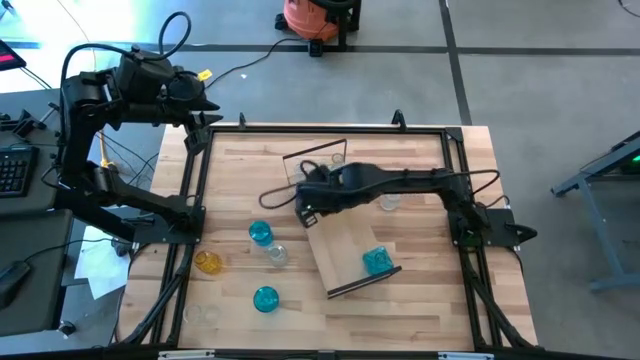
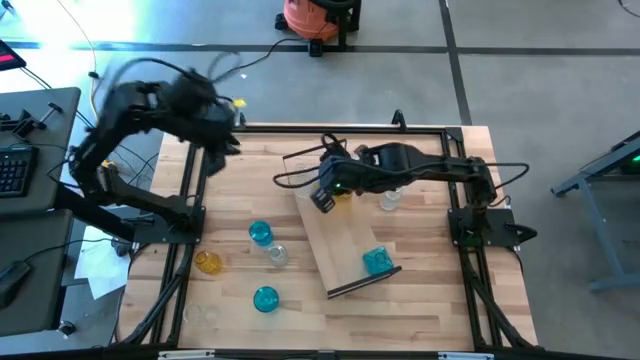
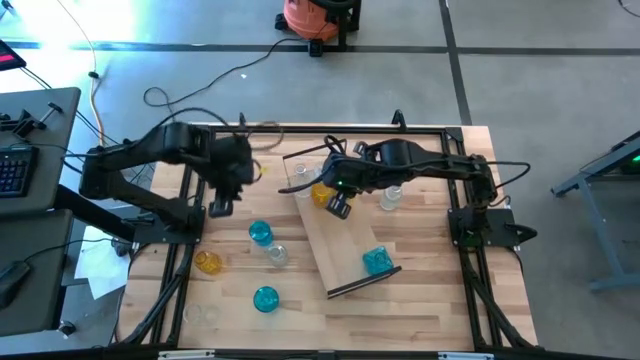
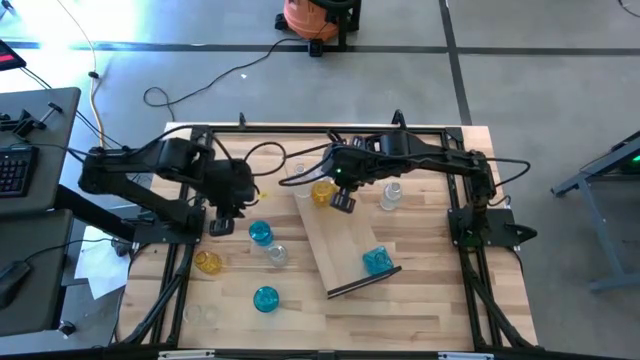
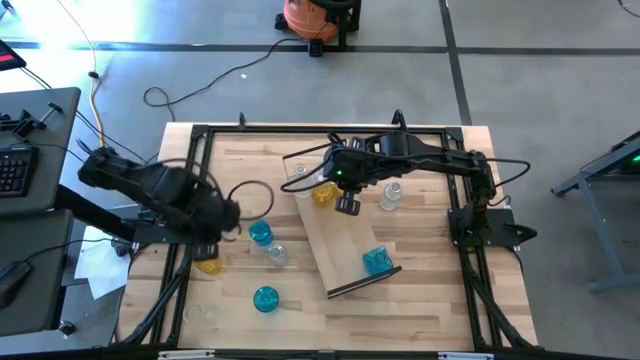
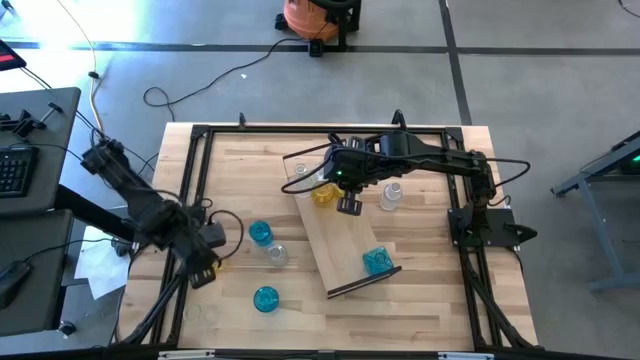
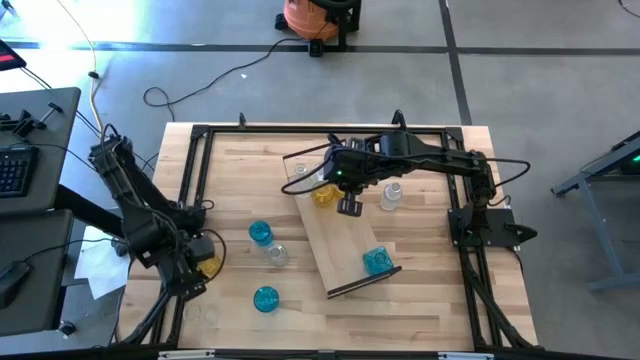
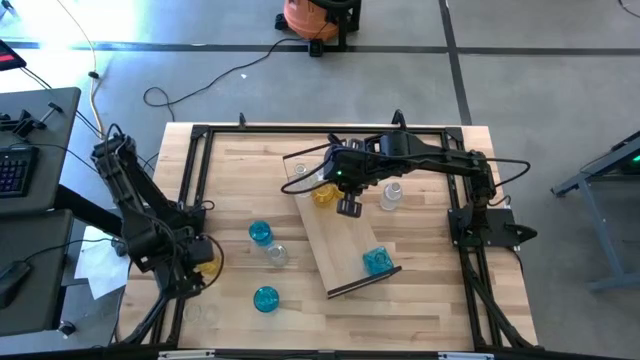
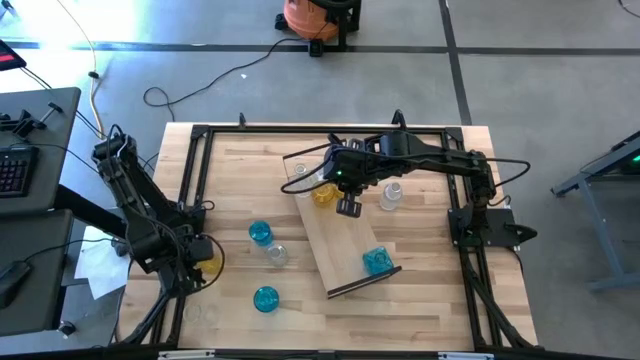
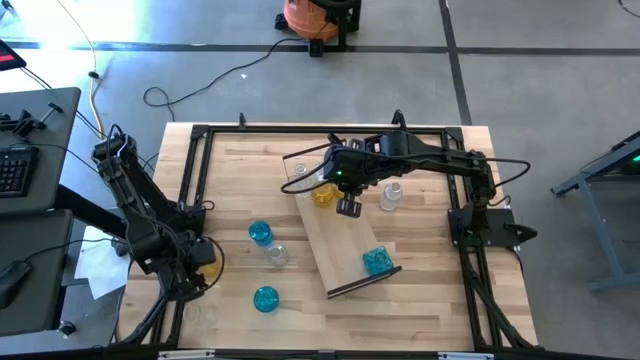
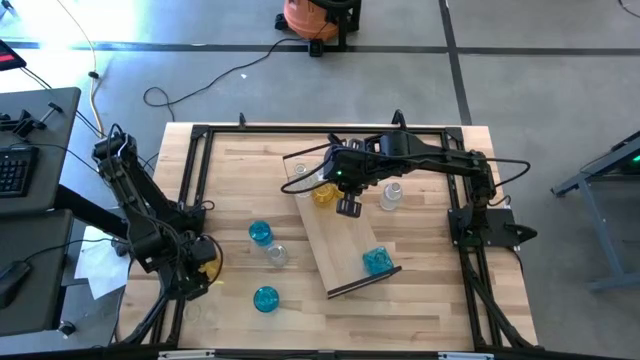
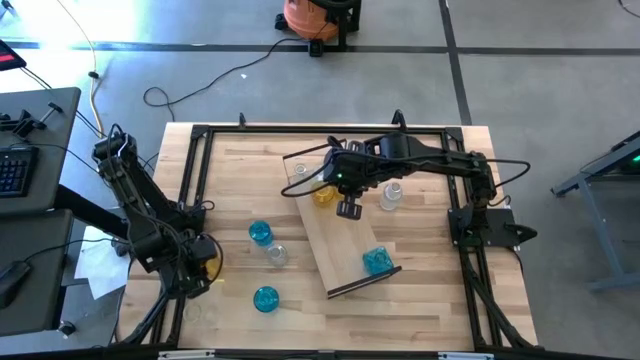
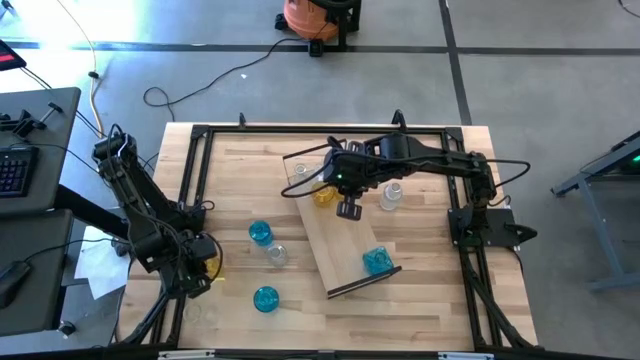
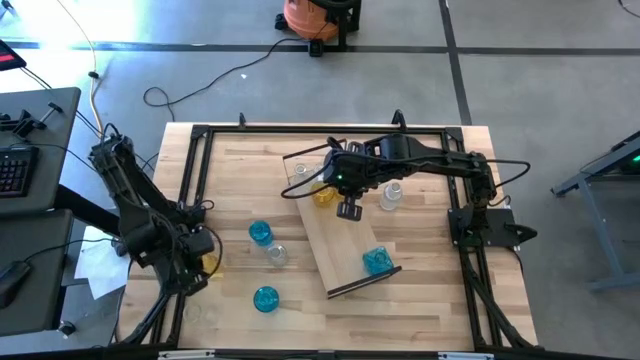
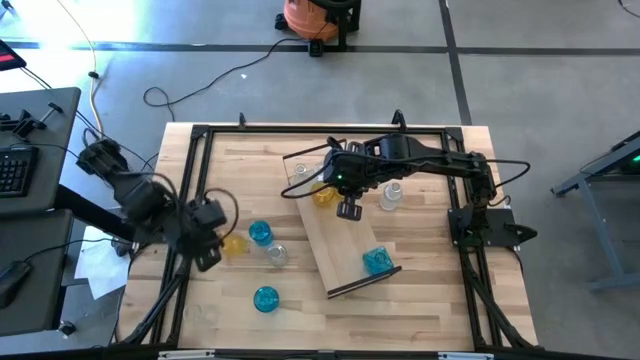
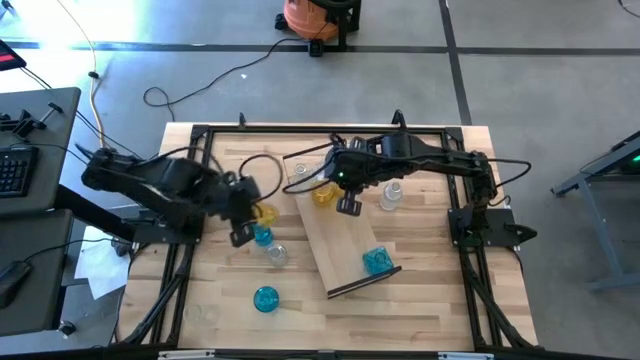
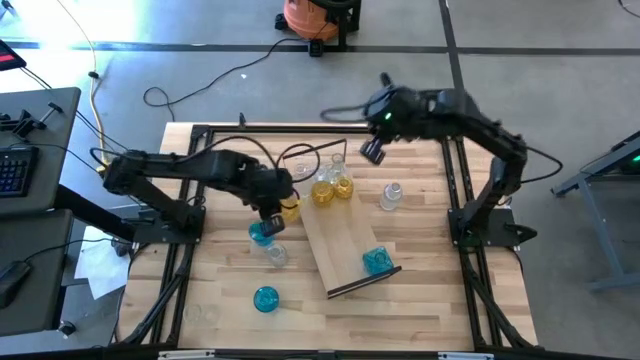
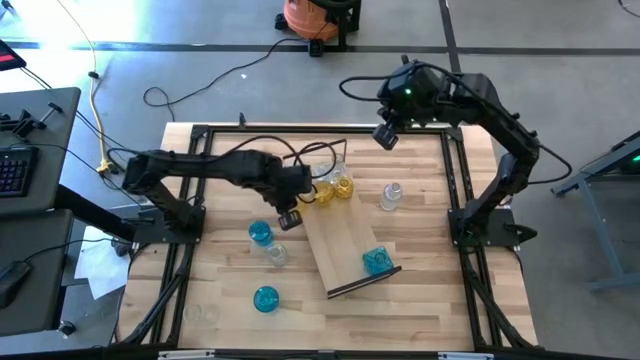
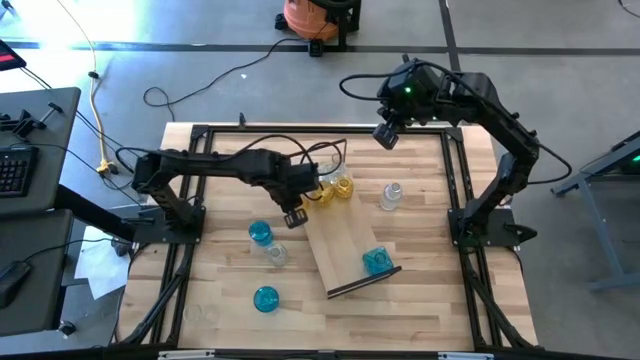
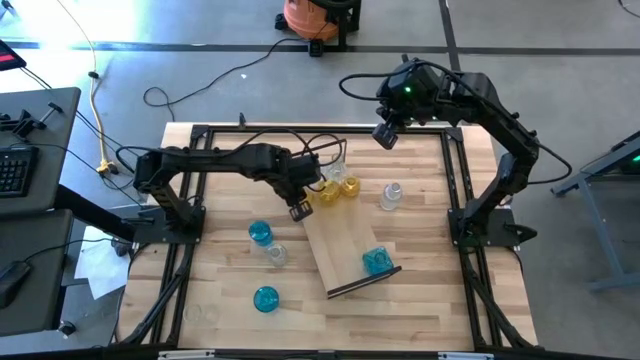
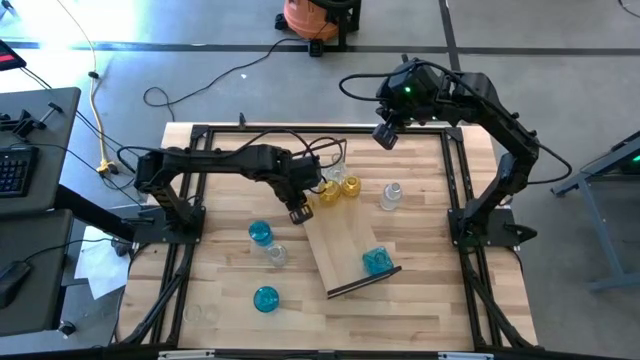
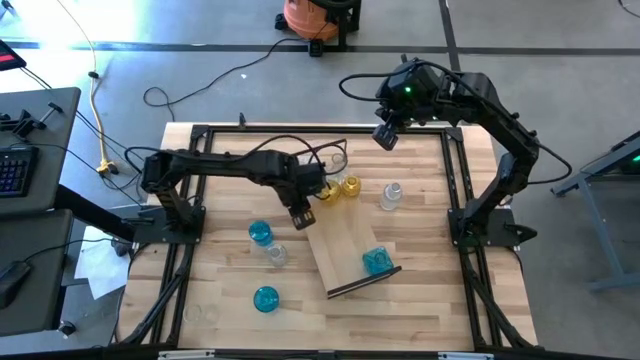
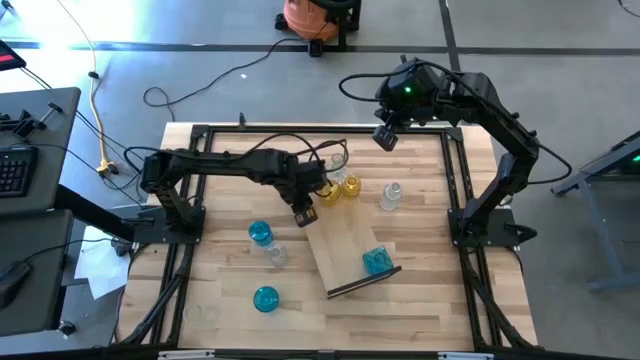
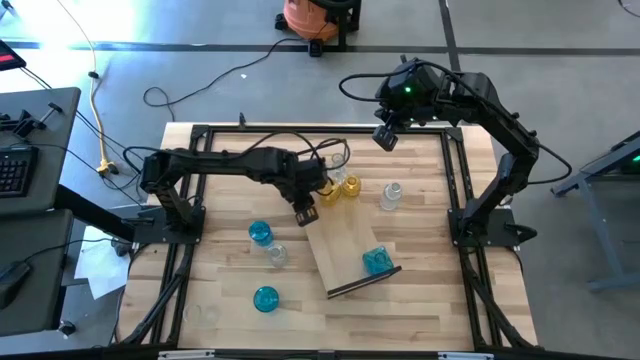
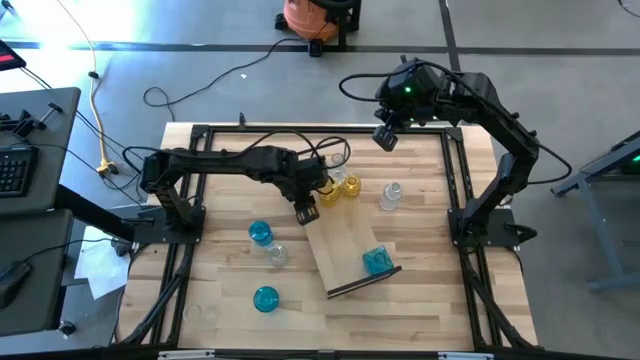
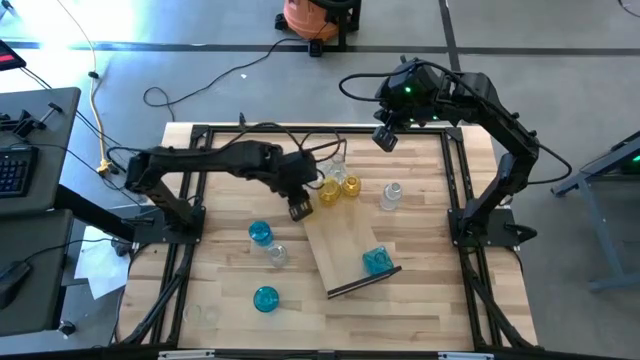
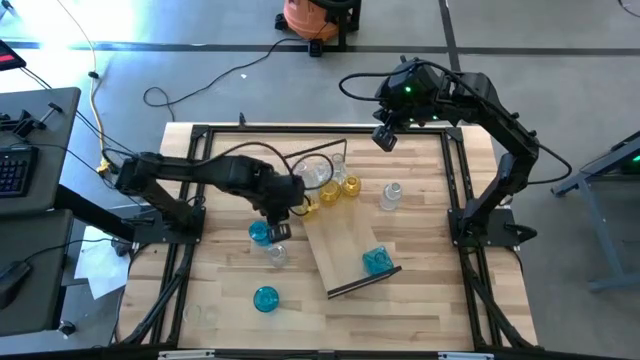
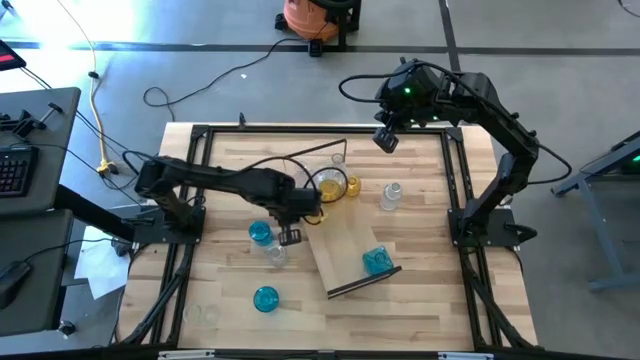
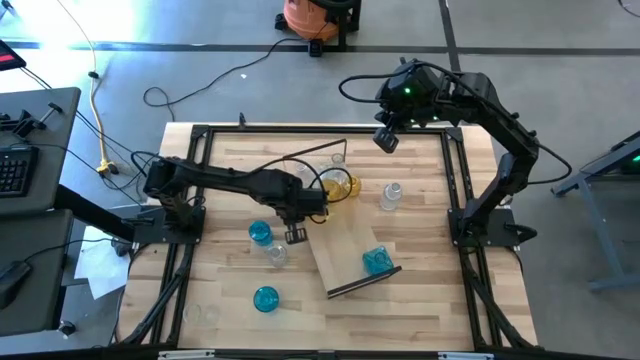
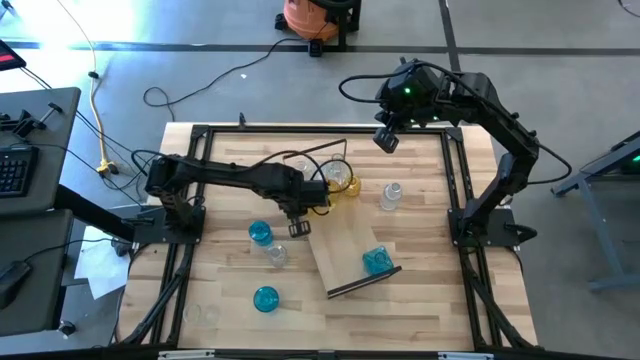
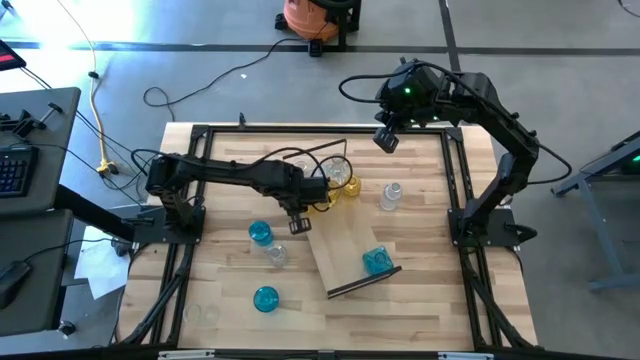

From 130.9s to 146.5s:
Task: sort vases onto shelf
Put the yellow crystal vase on the shelf aligned with the other yellow crystal vases

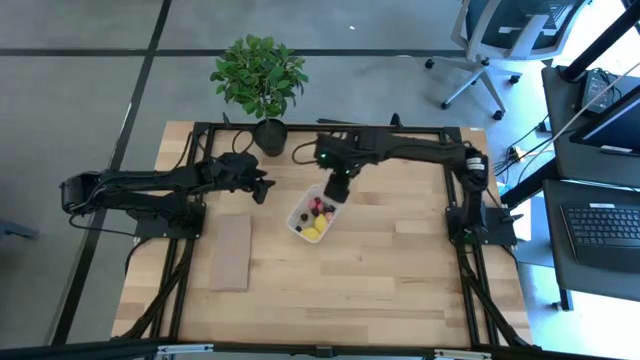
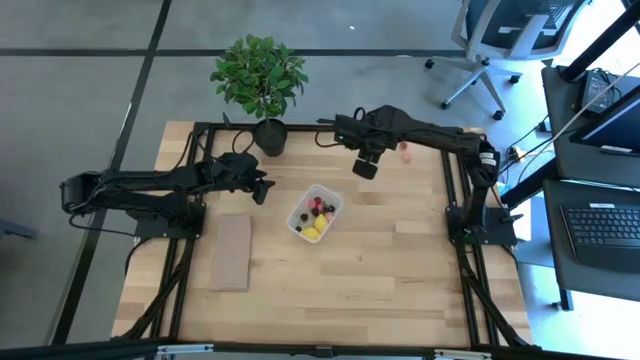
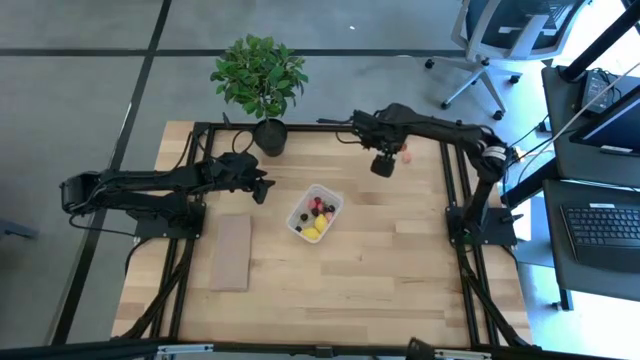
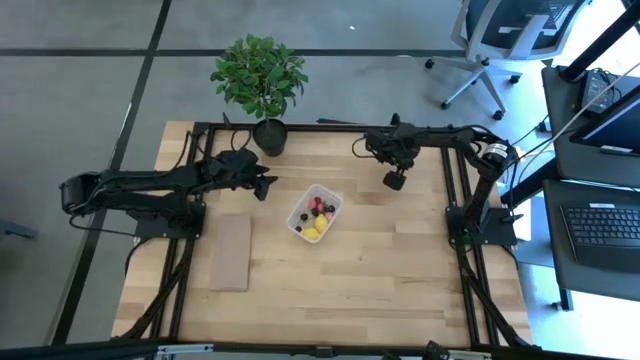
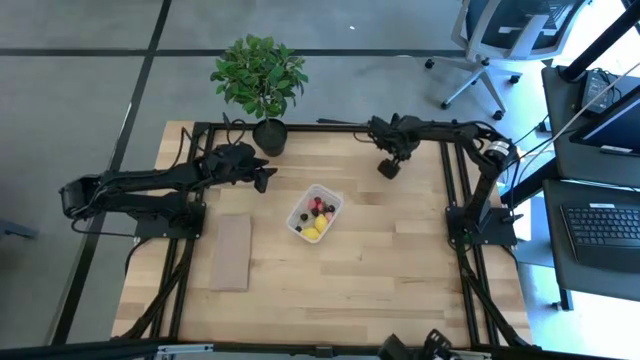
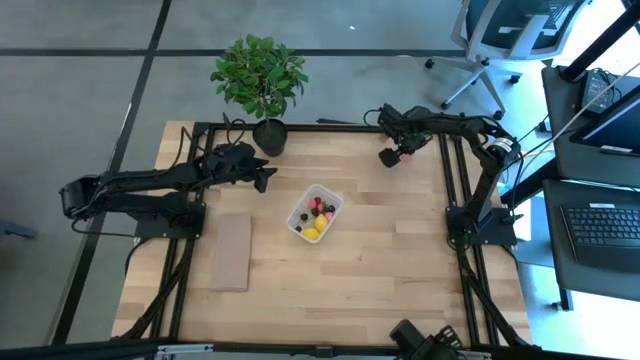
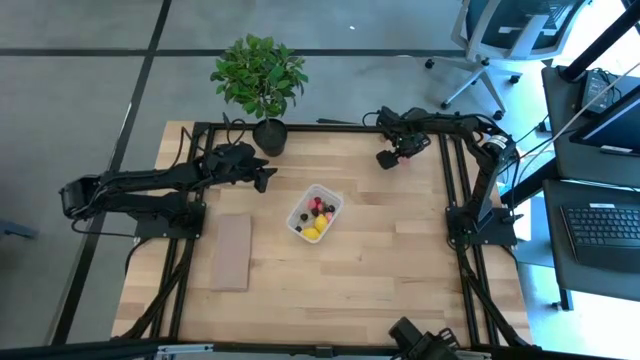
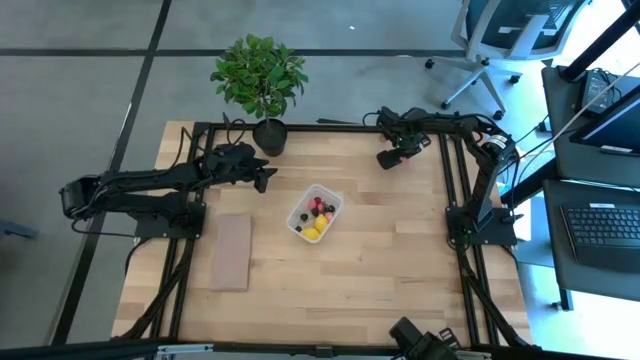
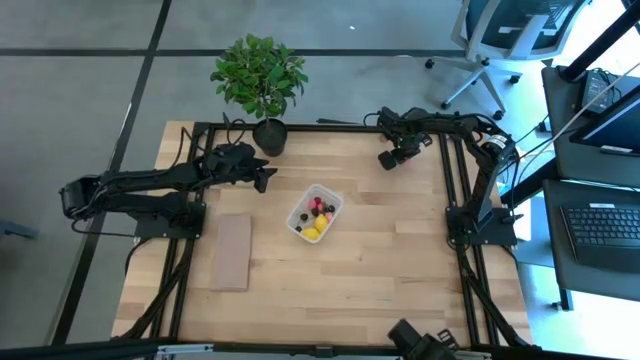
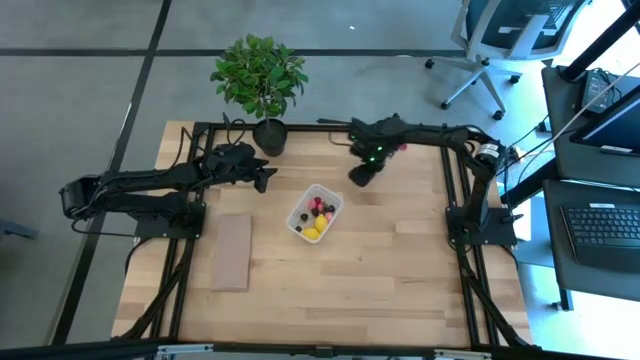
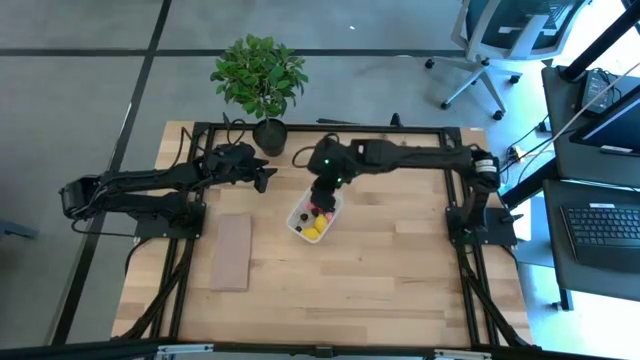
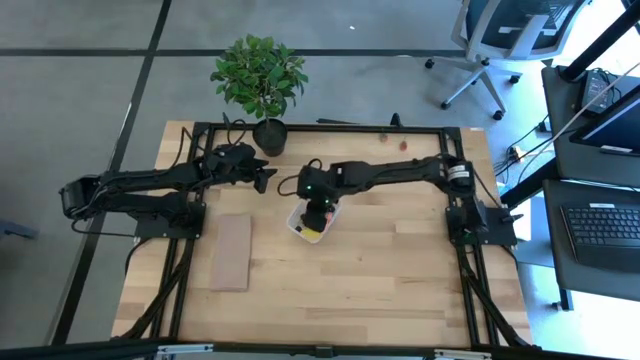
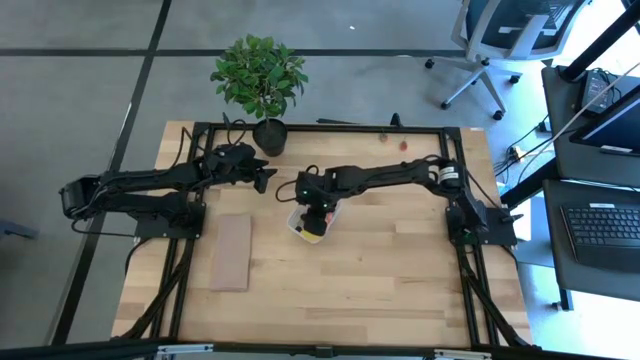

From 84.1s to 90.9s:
Task: Pick and placing Produce into tupperware
Put the peach into the transparent bin
